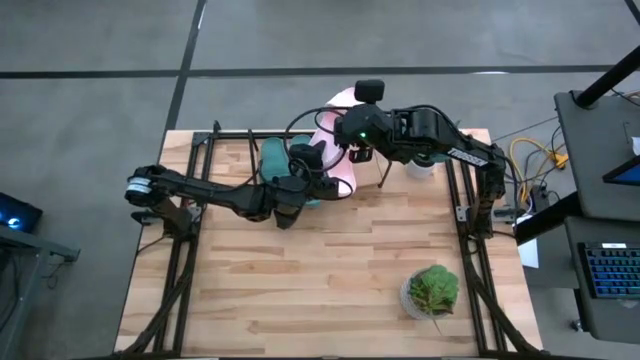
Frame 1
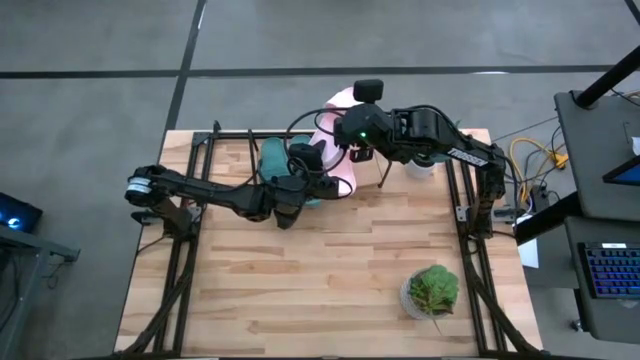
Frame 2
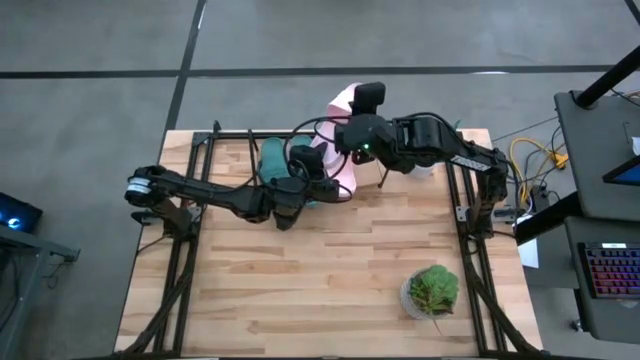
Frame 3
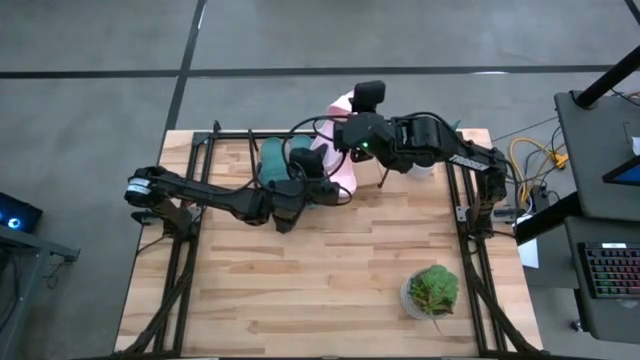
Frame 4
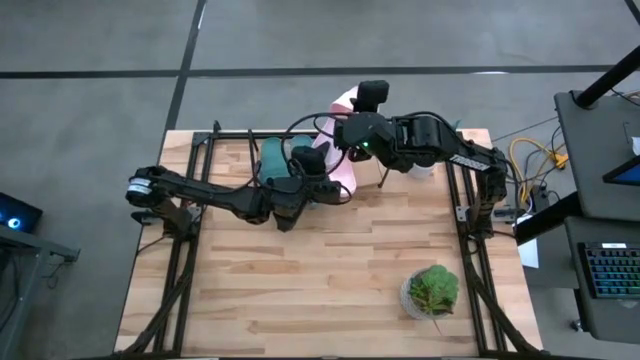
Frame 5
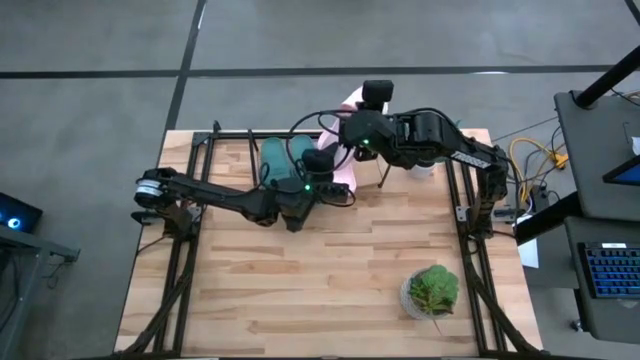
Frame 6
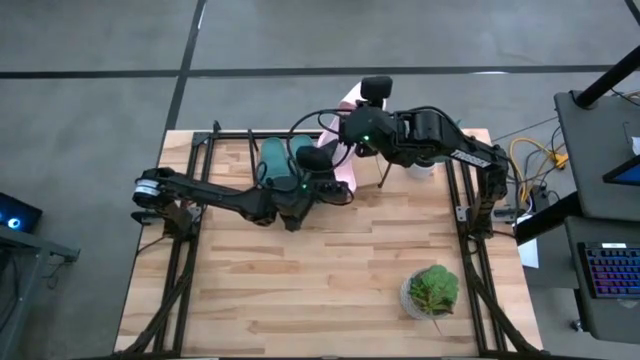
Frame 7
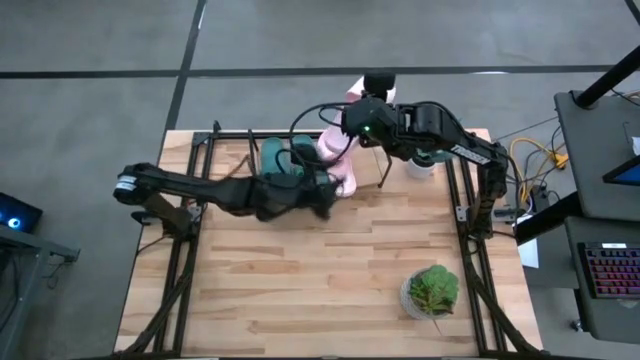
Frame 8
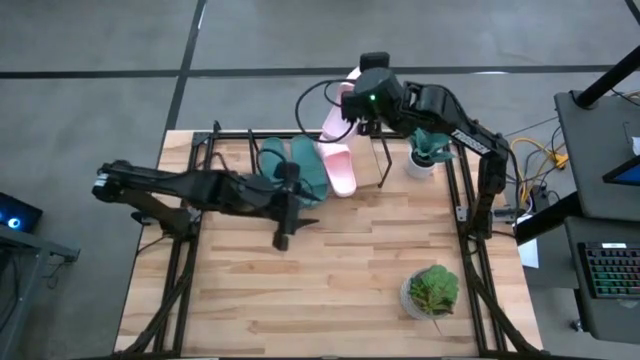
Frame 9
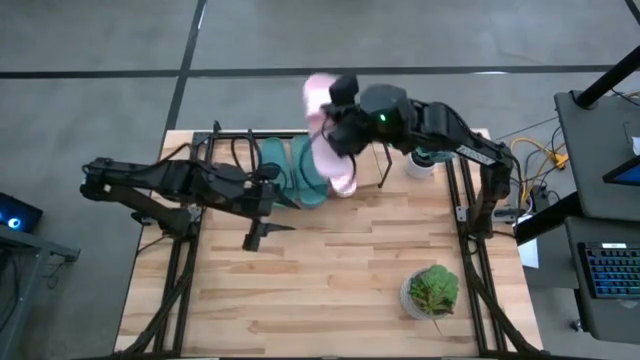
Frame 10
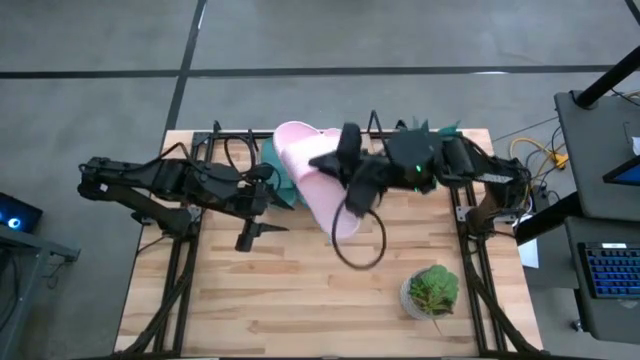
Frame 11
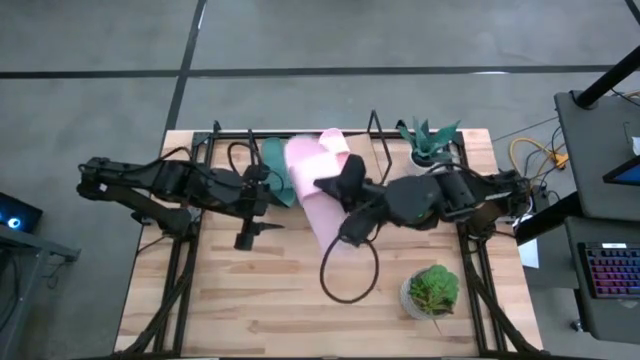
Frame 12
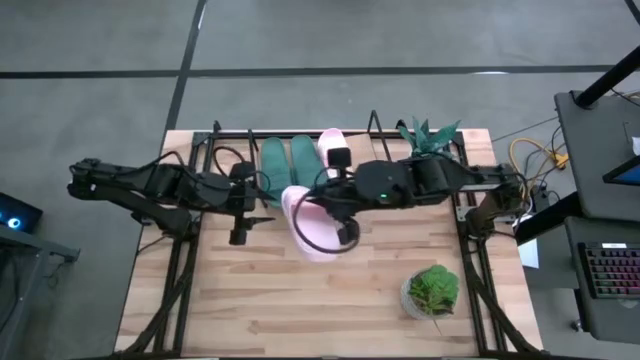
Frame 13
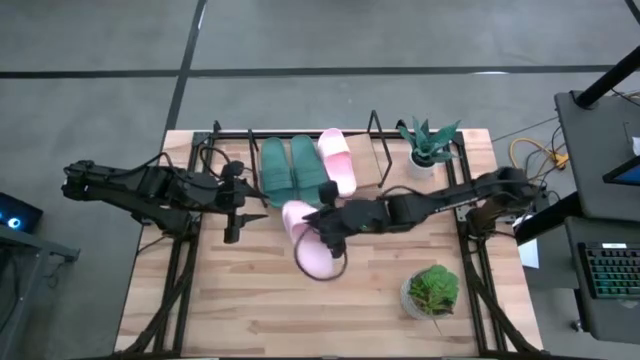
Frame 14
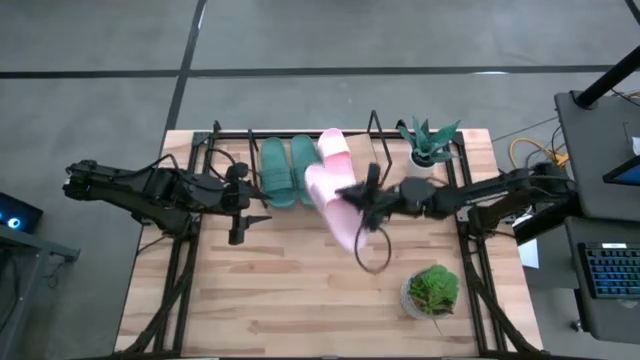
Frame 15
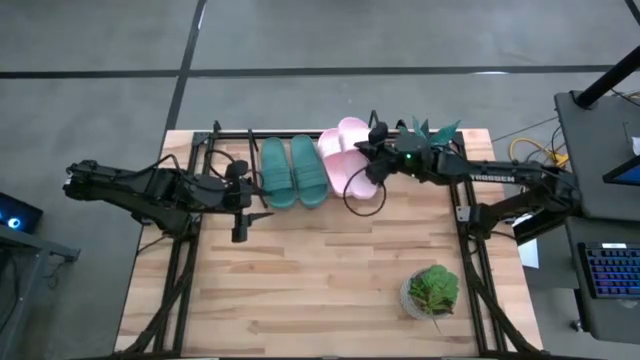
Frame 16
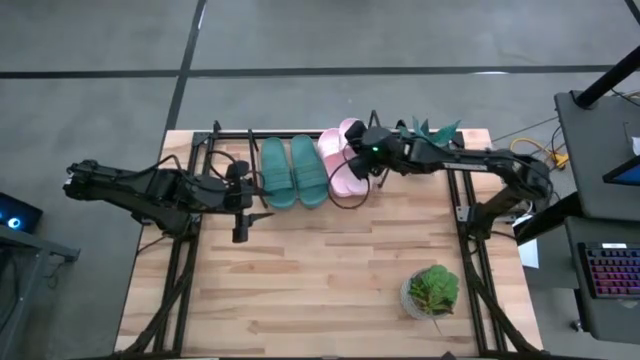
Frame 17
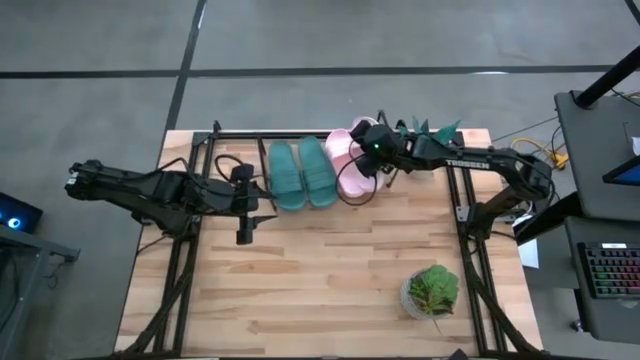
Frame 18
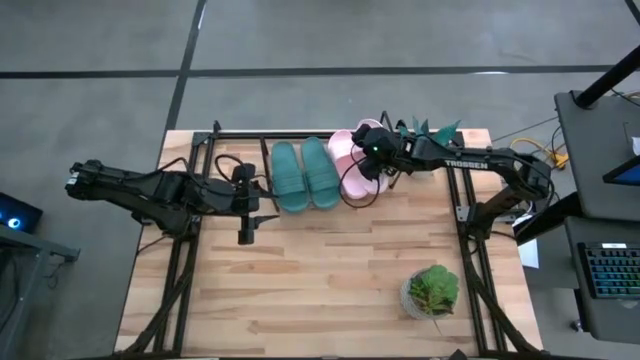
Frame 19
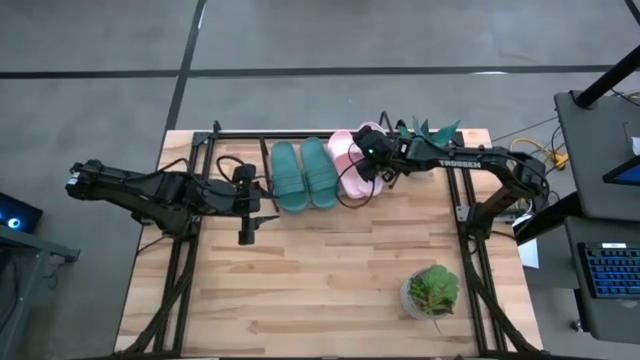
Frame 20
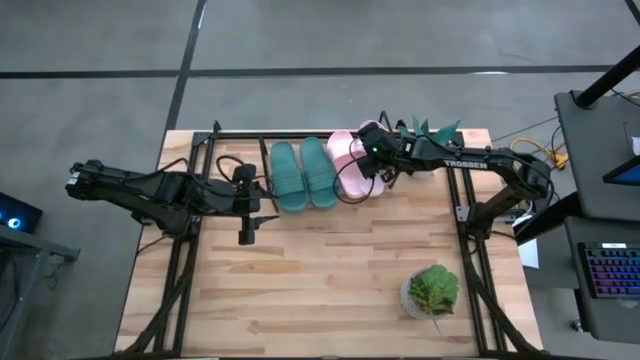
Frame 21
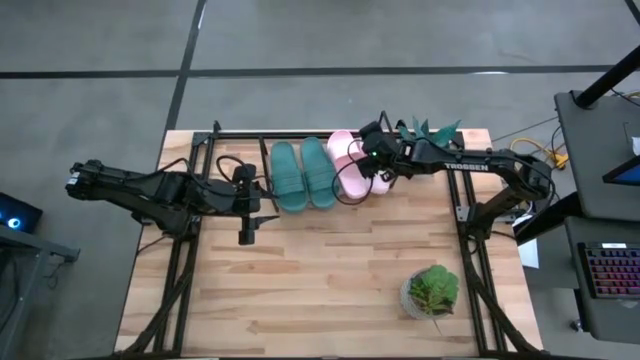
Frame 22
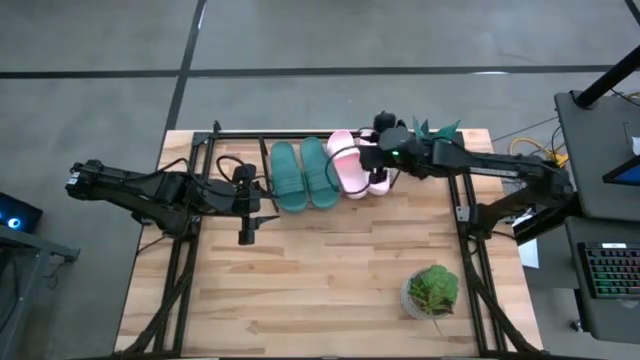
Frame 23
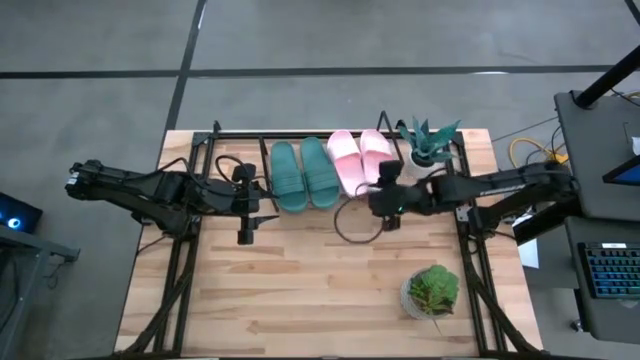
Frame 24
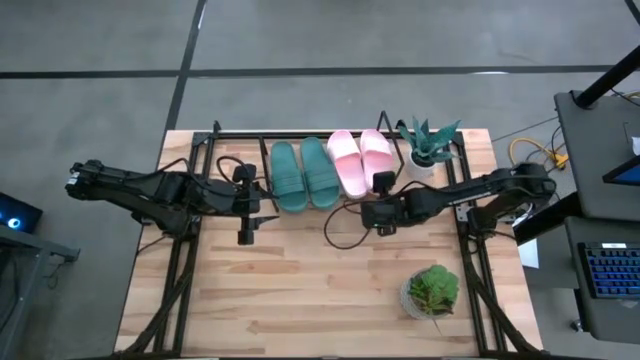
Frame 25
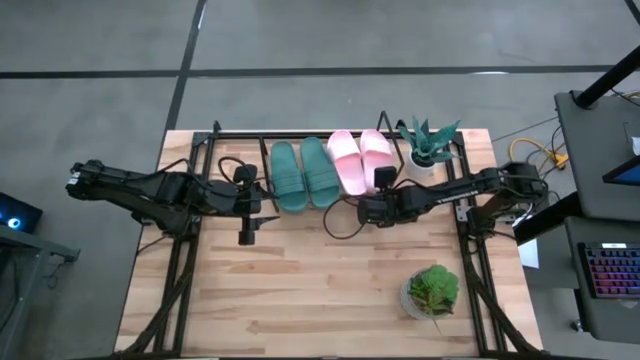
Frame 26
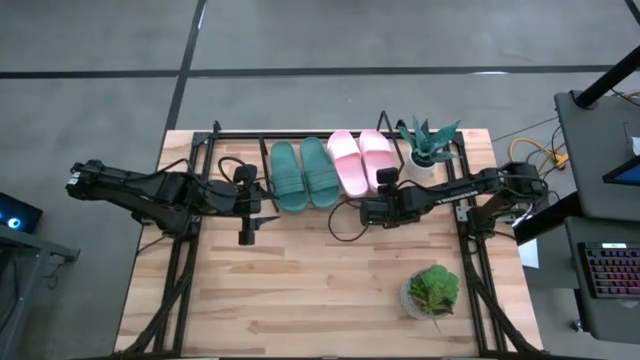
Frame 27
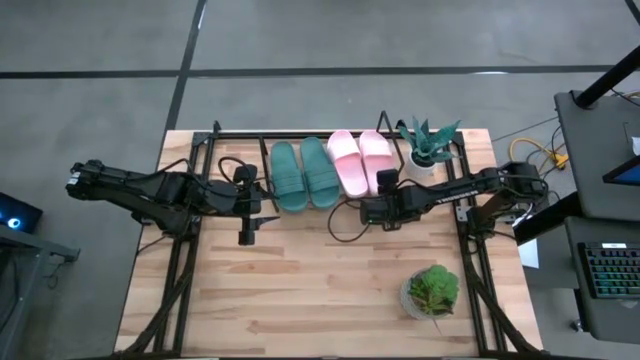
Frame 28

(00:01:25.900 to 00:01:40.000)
Task: Pick and place slides into the shelf
Put the pink slide on the shelf

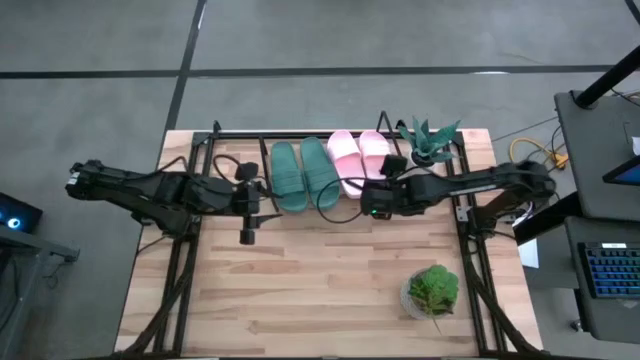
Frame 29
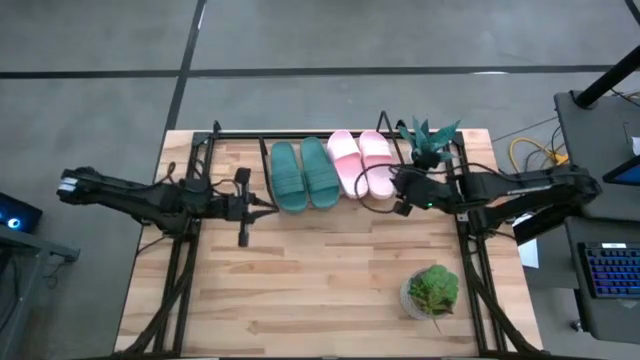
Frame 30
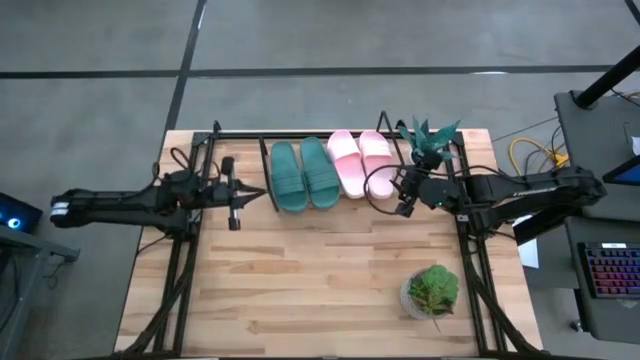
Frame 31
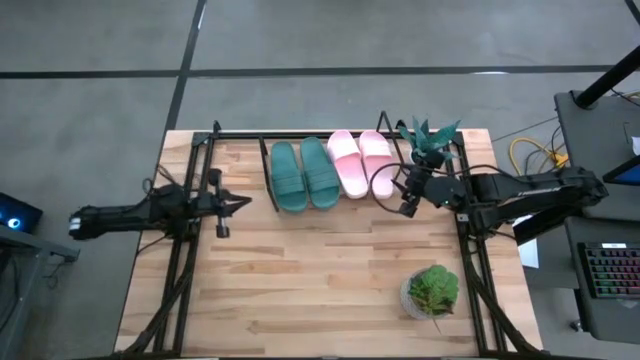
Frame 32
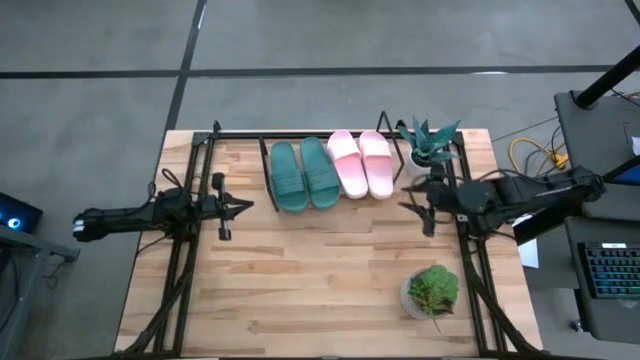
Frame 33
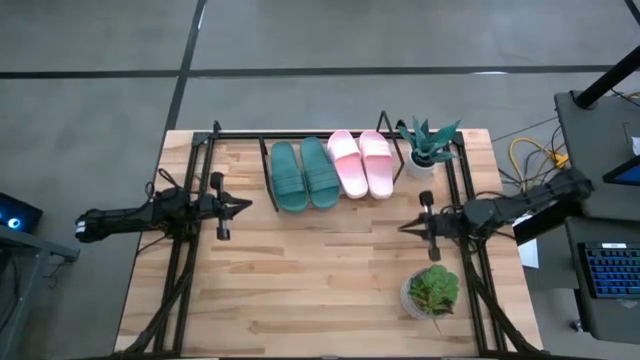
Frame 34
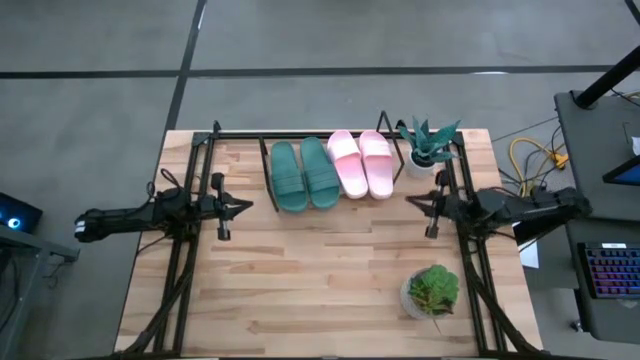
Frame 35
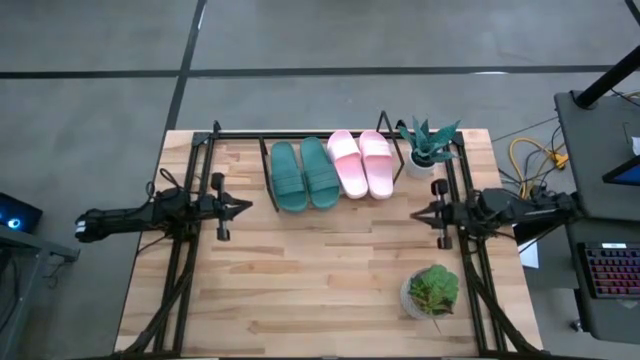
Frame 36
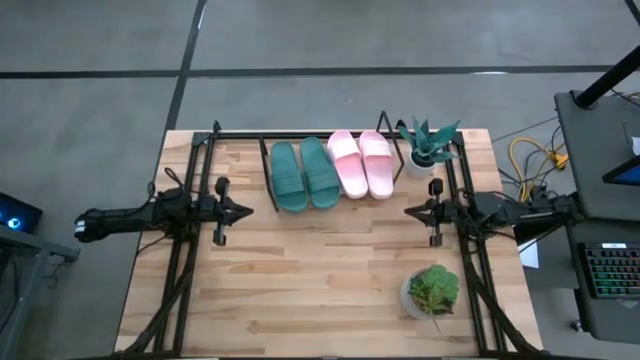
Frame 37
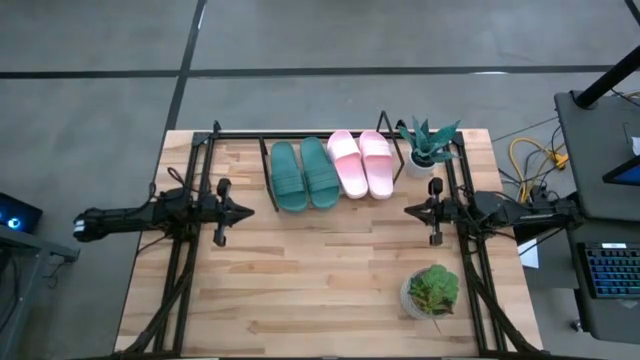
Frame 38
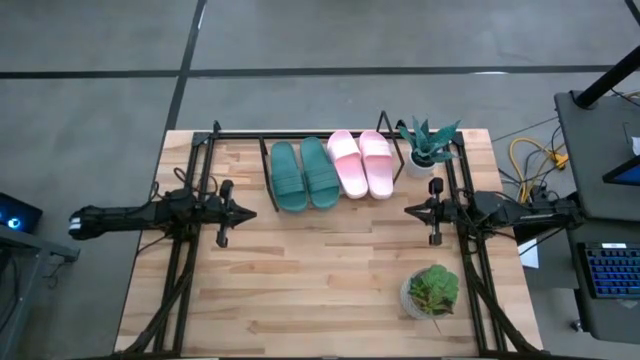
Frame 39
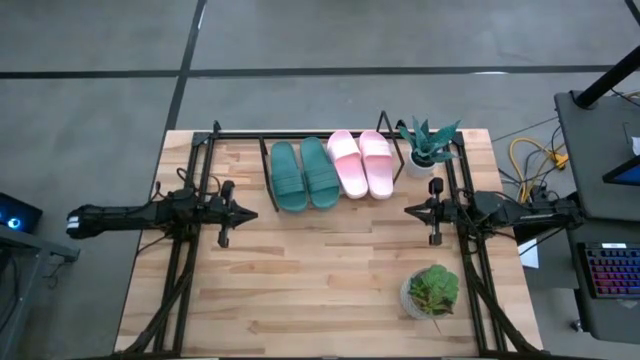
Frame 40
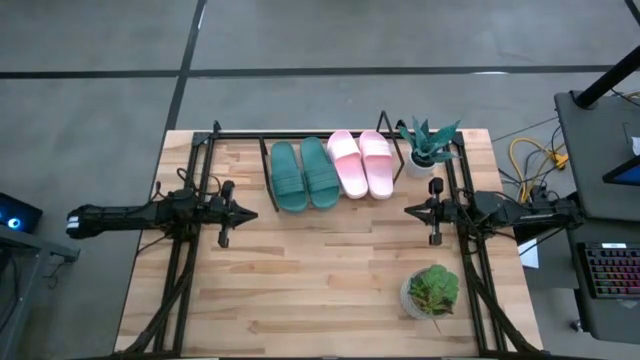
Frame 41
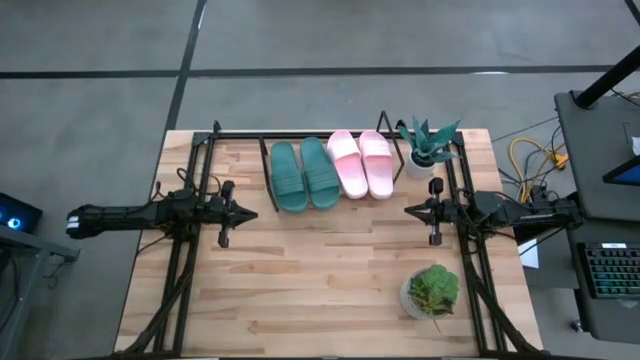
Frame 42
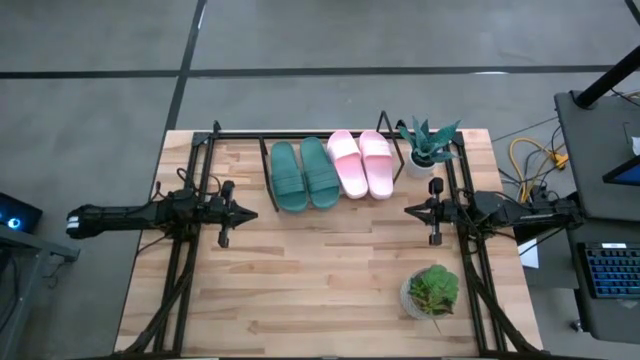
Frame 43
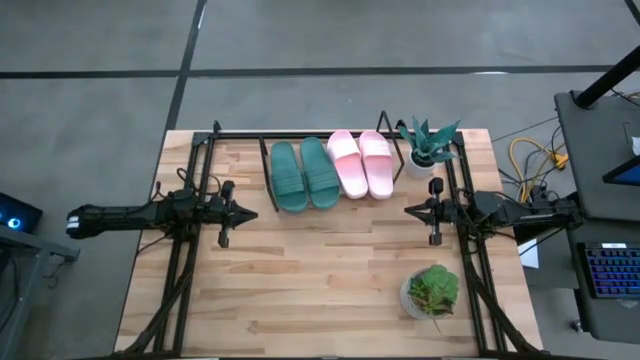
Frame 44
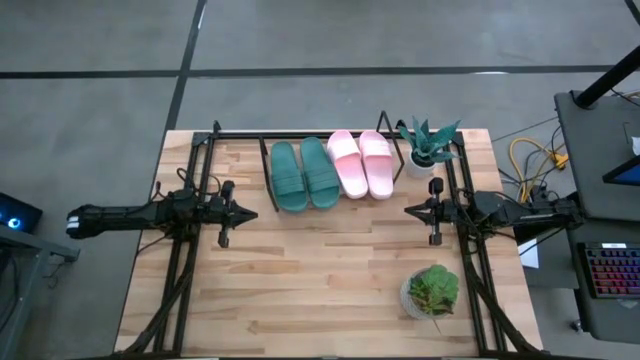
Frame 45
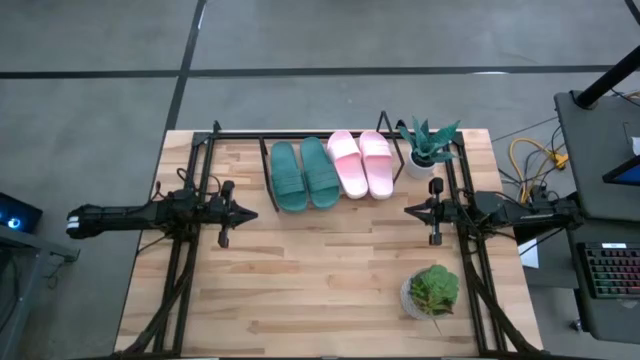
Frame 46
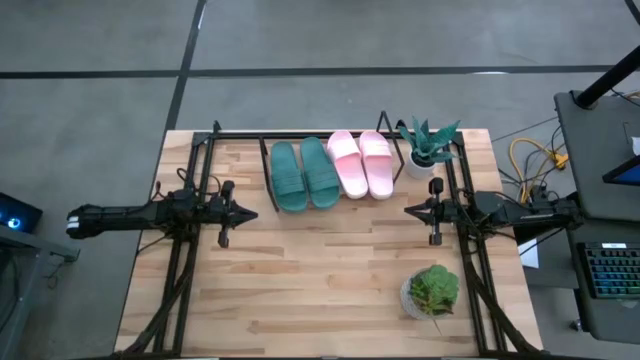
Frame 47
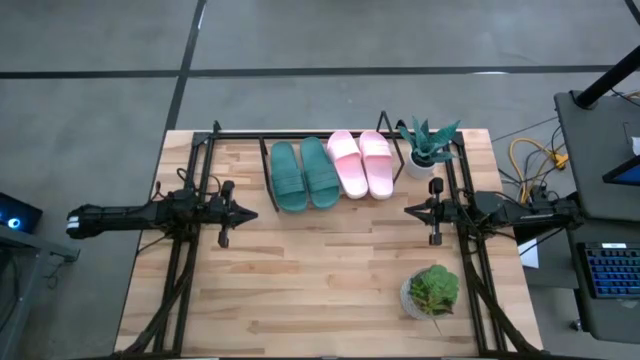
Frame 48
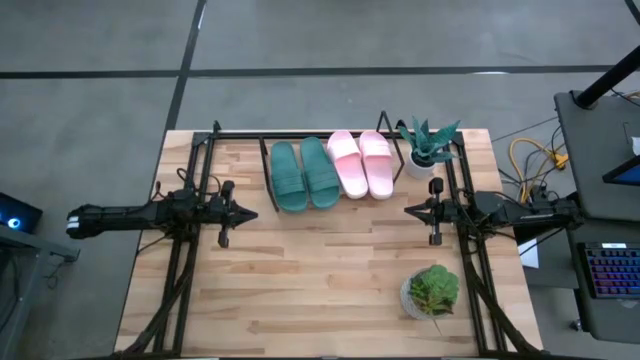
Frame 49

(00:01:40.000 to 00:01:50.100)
Return to Home Position
